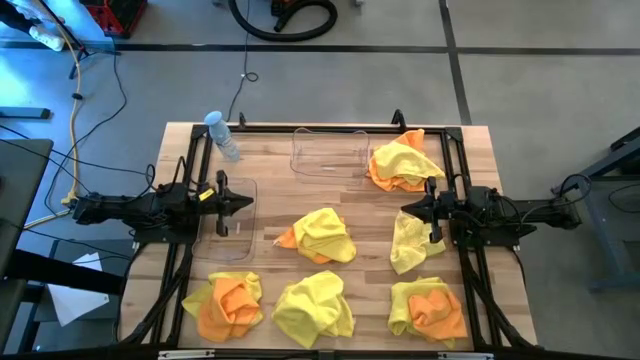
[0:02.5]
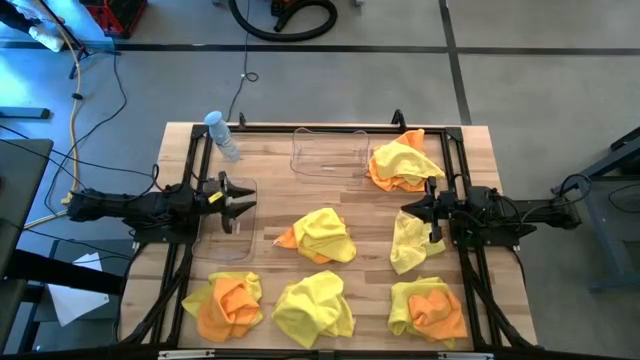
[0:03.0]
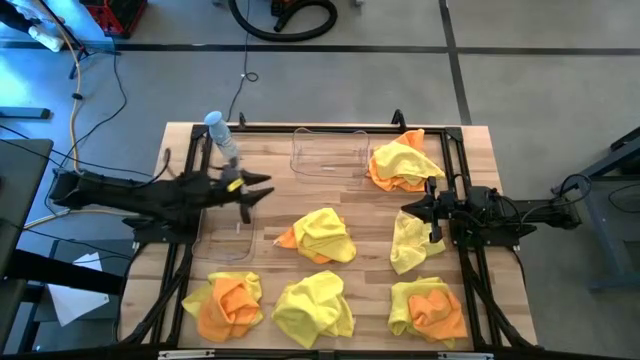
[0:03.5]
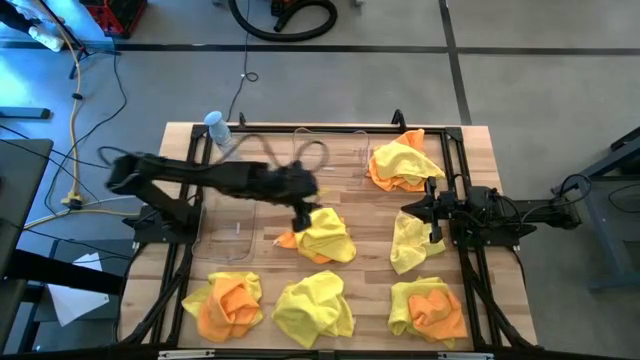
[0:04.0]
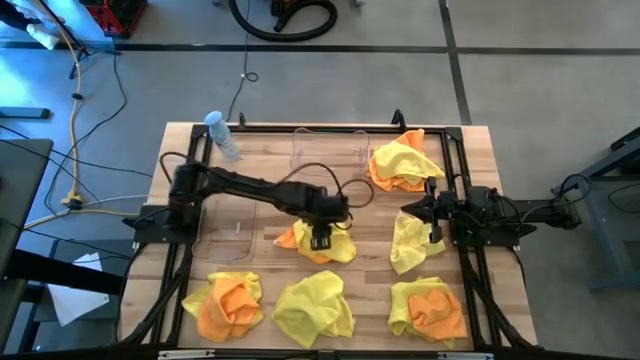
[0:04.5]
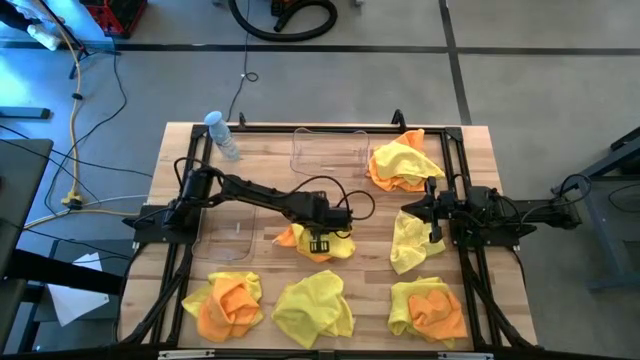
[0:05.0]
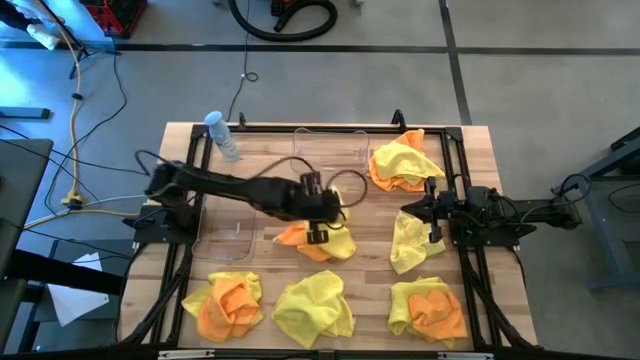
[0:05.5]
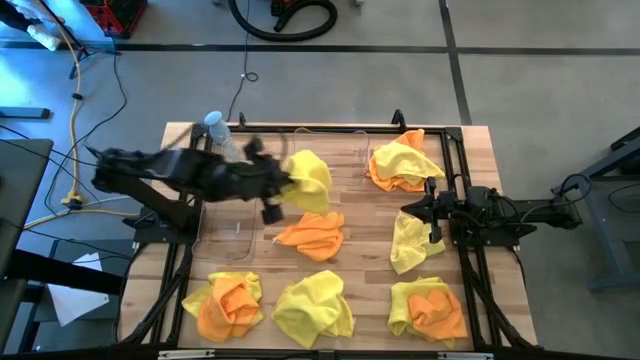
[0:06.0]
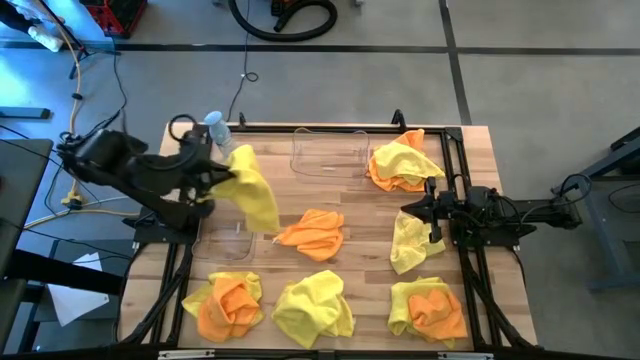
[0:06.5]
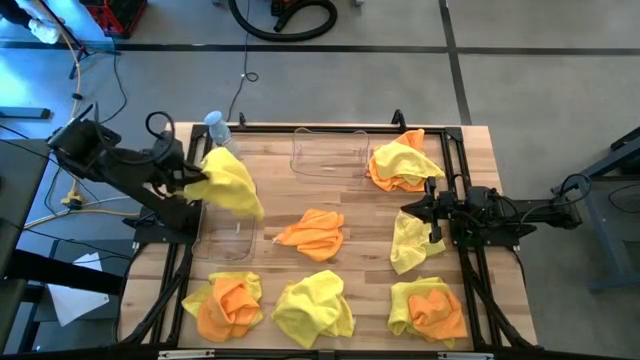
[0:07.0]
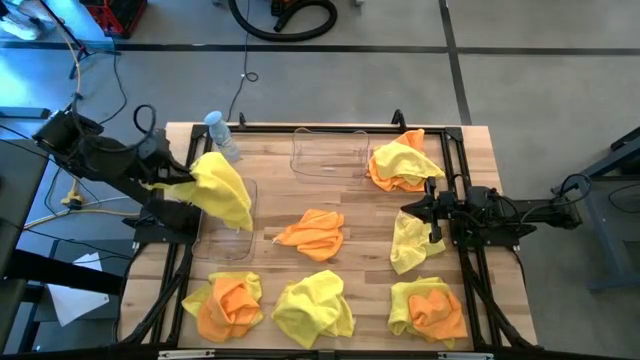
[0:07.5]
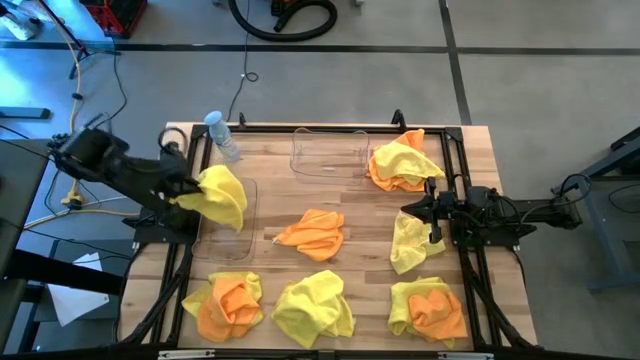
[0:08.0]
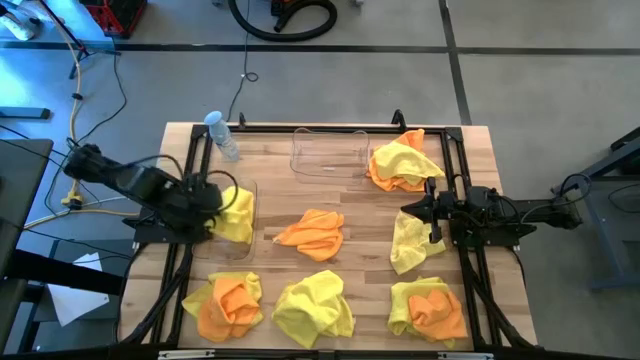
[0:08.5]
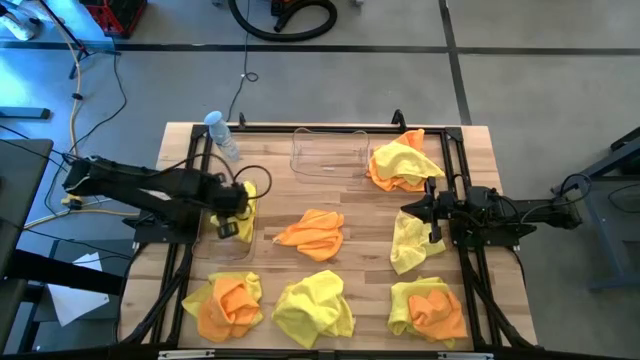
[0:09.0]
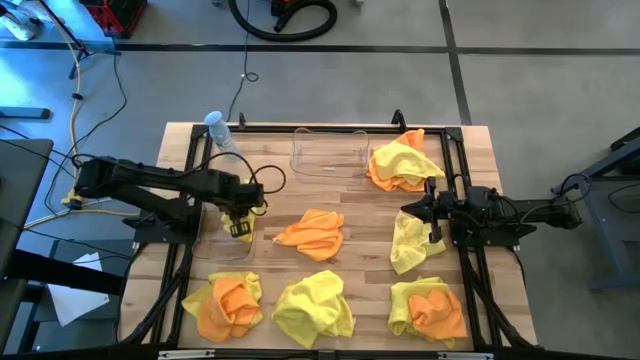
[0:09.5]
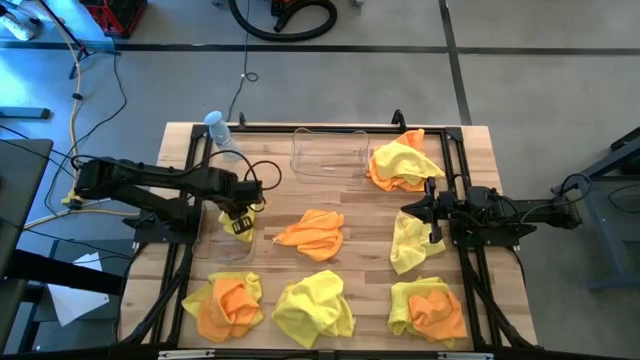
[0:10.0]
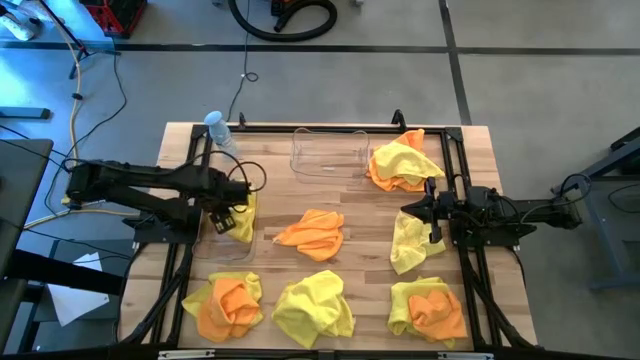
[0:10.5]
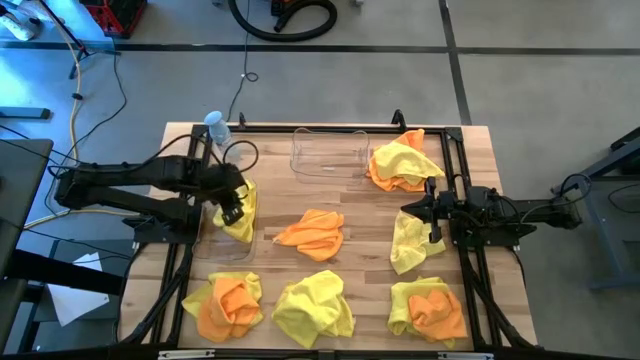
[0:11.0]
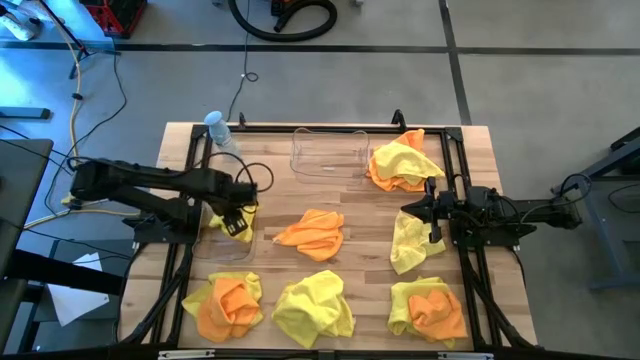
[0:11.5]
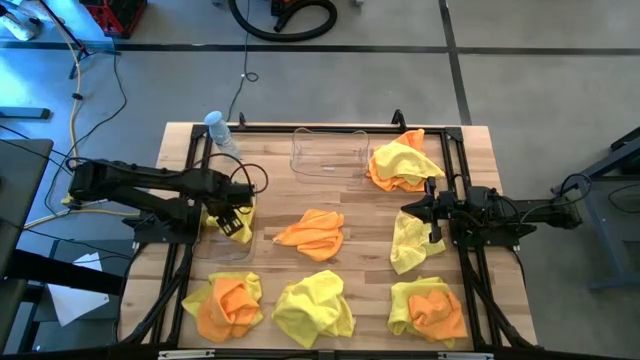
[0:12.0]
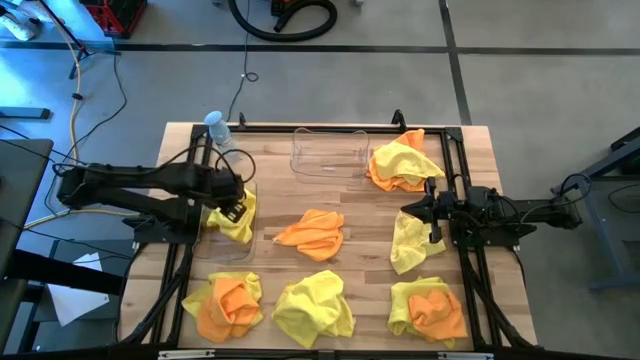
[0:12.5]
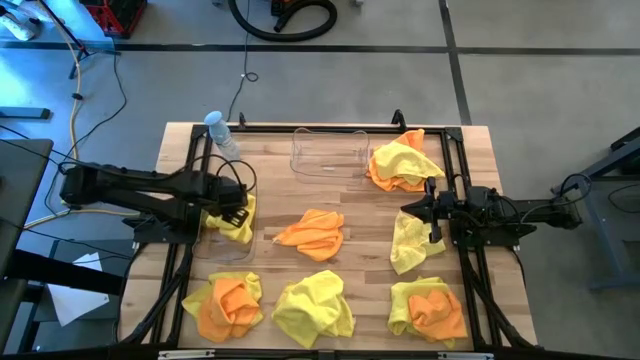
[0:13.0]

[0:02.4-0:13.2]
Task: Sort microfiber towel by color & place in baskets
Put the yellow microfiber towel into the bottom transparent bin

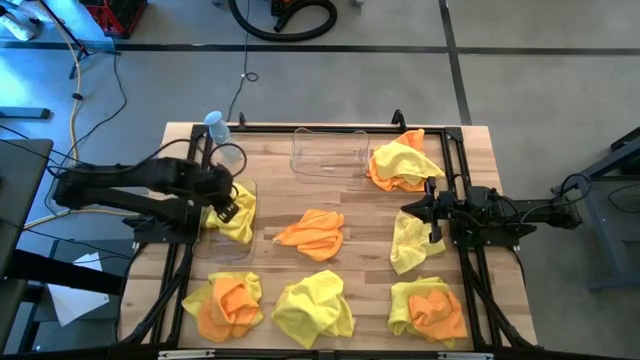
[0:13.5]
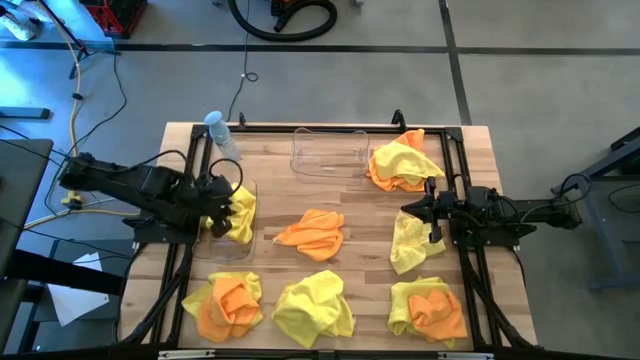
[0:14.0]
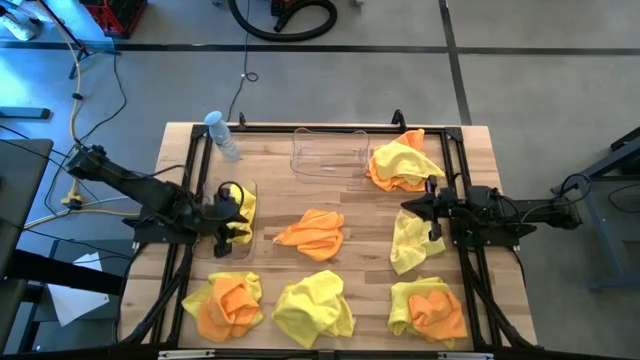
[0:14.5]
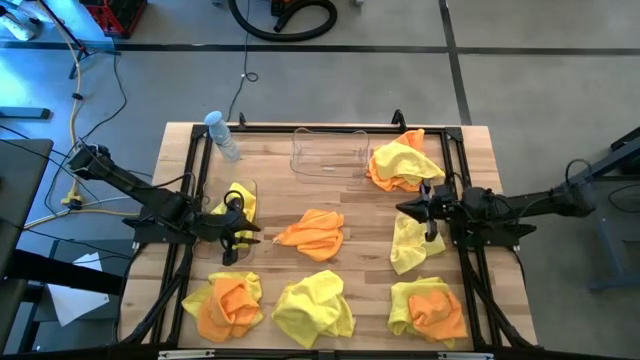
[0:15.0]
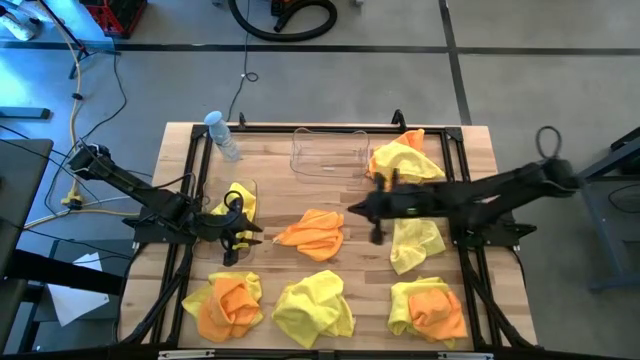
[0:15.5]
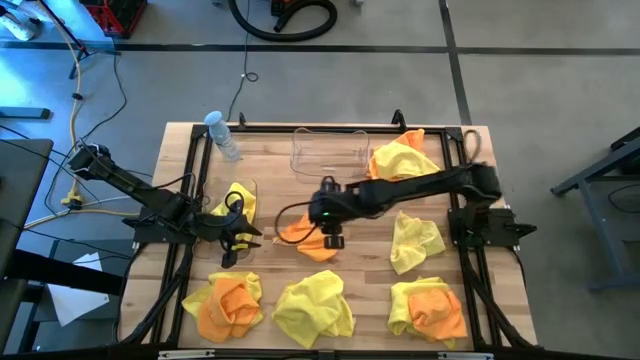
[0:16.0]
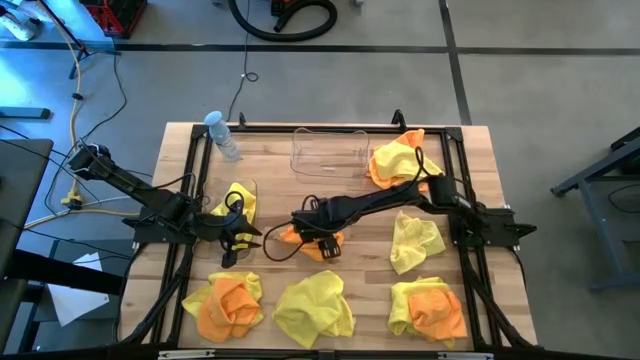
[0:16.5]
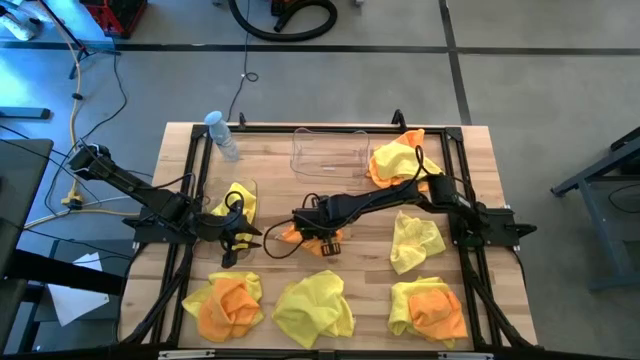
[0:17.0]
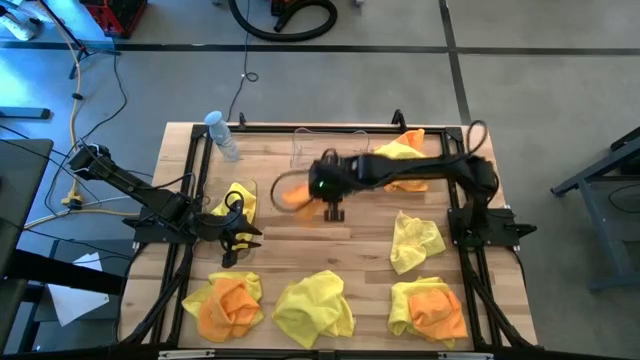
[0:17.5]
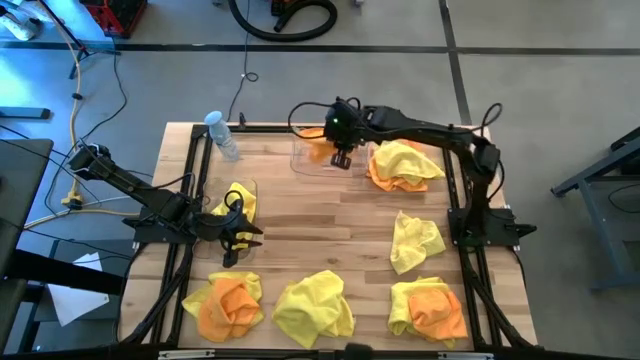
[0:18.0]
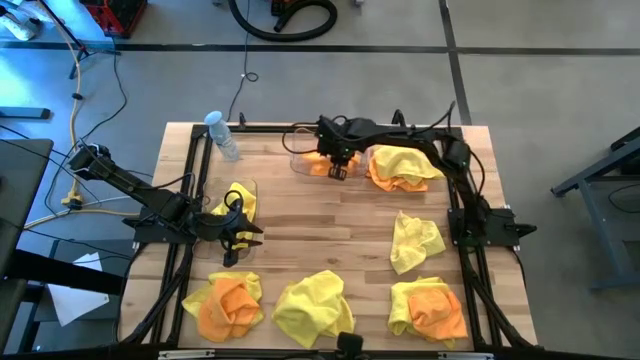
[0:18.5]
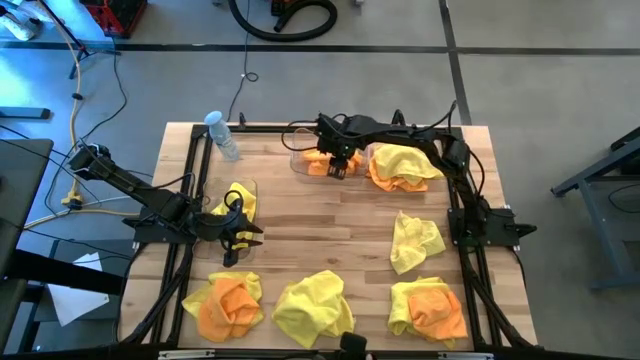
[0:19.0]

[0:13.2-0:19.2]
Put the orange microfiber towel into the top transparent bin

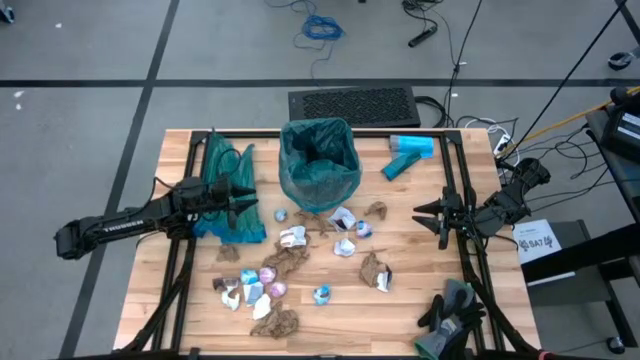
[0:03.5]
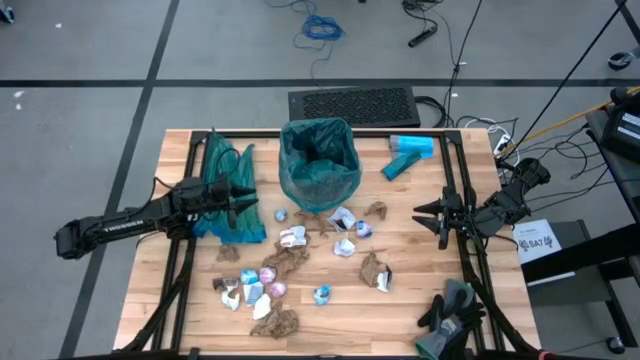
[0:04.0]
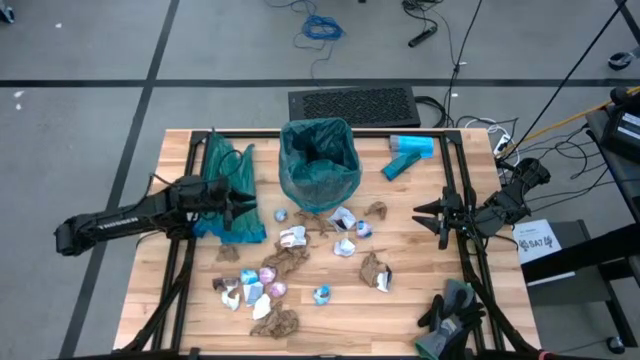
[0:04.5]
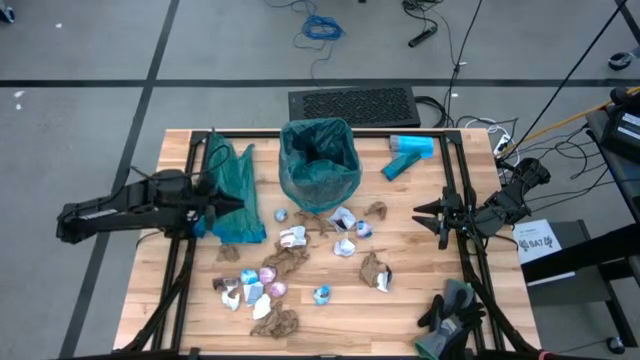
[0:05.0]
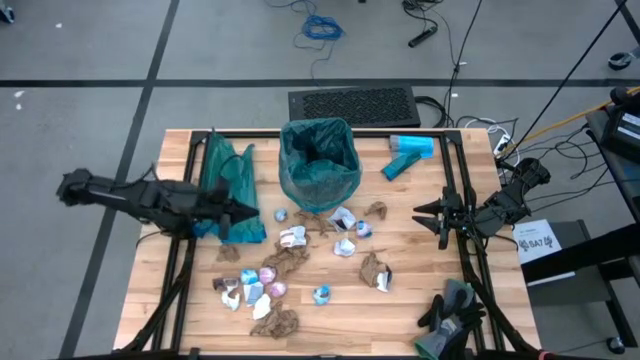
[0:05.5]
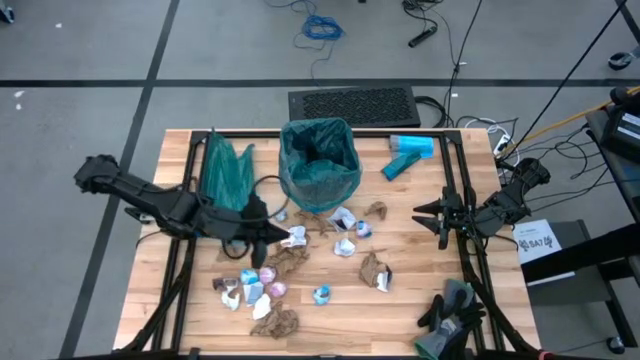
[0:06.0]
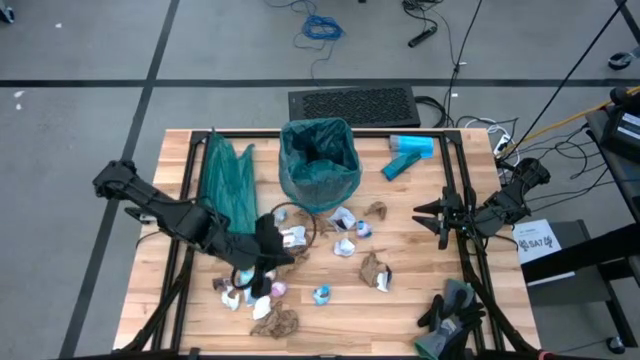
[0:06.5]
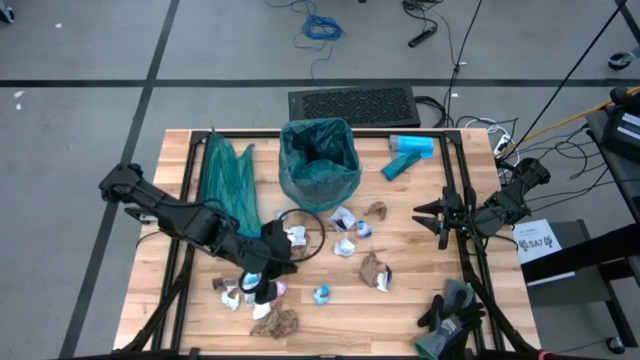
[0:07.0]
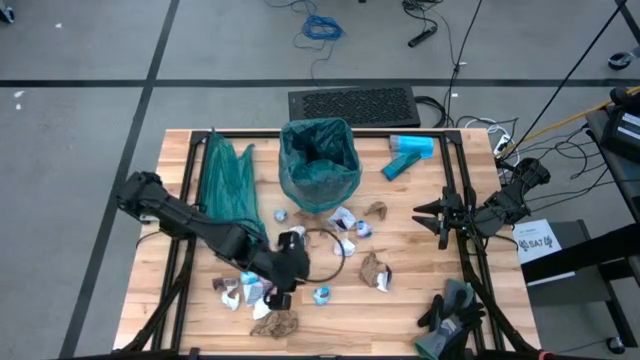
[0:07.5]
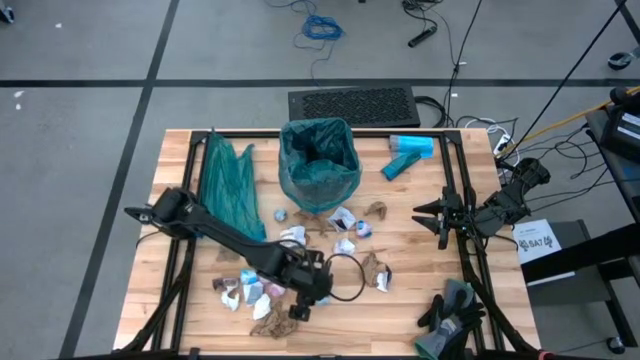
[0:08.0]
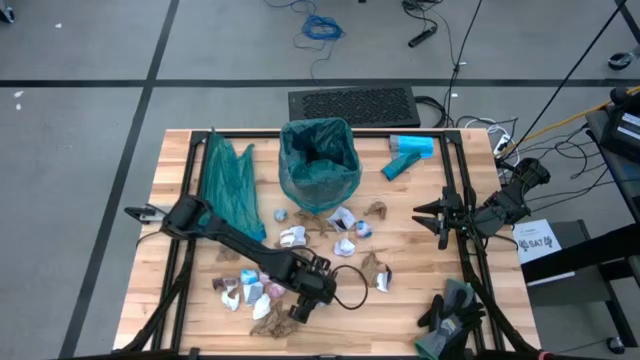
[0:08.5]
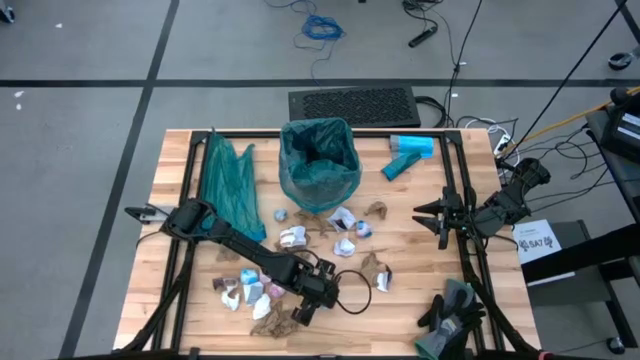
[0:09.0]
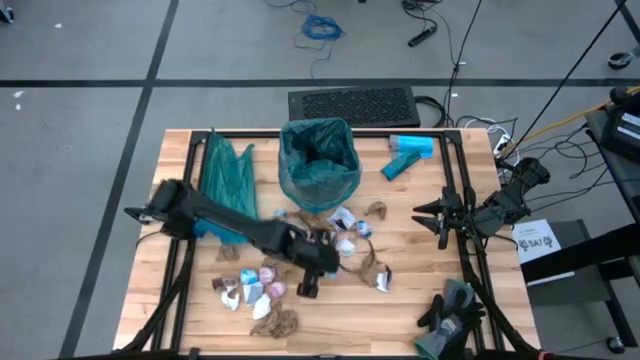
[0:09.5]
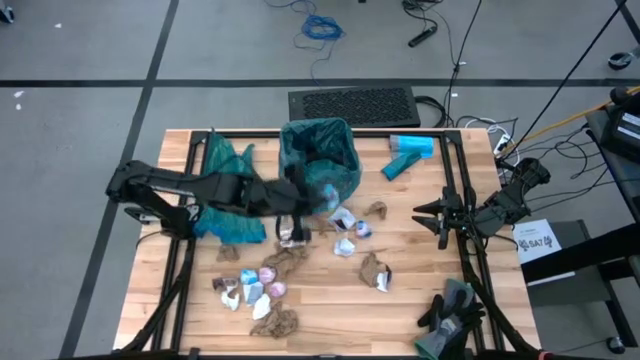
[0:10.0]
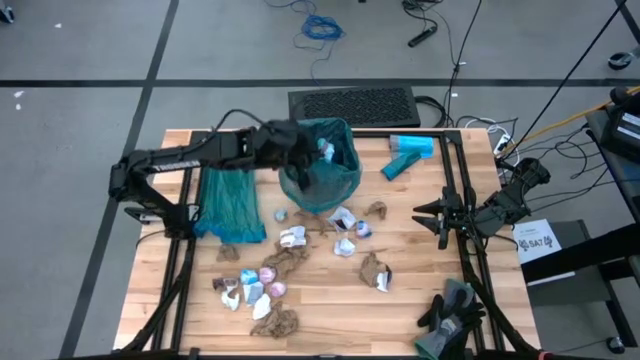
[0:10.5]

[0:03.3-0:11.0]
Task: place trash/remove bag and relplace
Put the blue plastic into the blue trash bag inside the black trash bin
